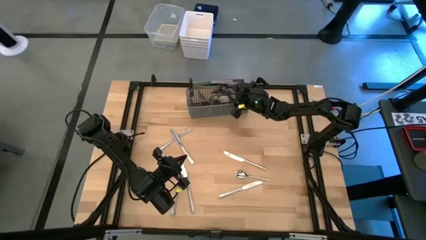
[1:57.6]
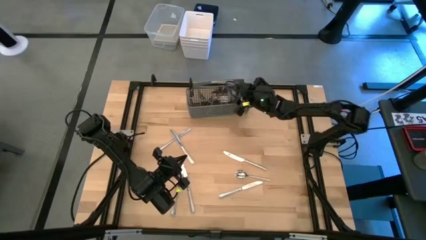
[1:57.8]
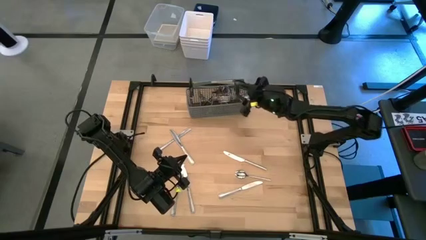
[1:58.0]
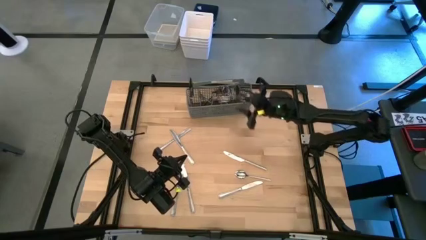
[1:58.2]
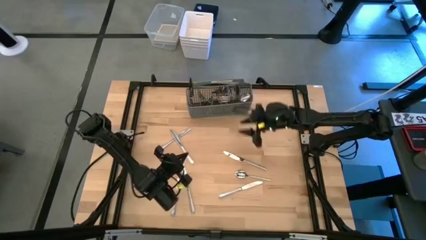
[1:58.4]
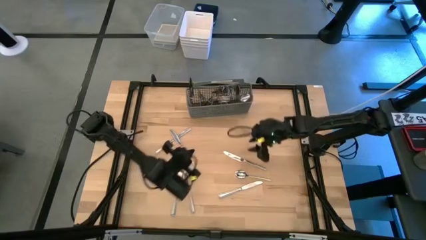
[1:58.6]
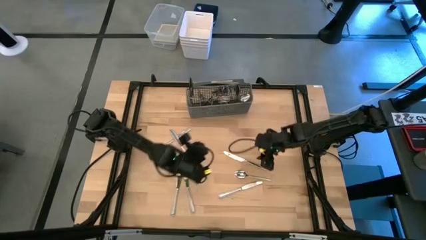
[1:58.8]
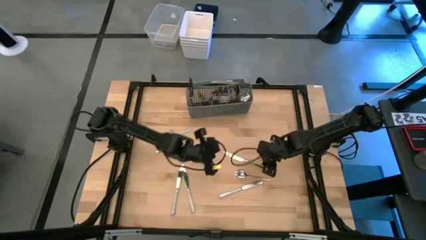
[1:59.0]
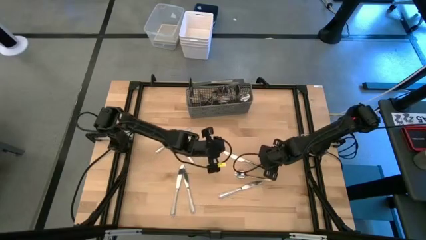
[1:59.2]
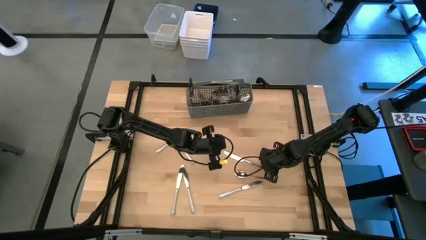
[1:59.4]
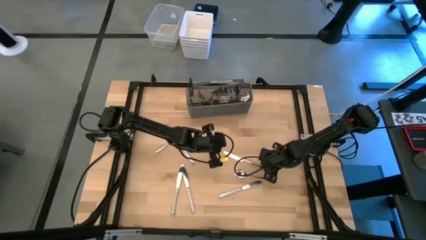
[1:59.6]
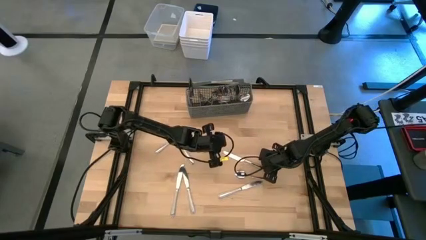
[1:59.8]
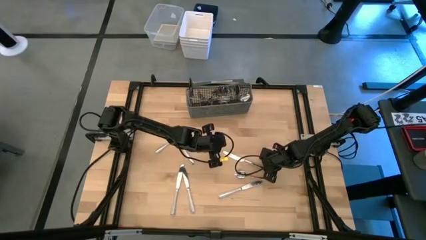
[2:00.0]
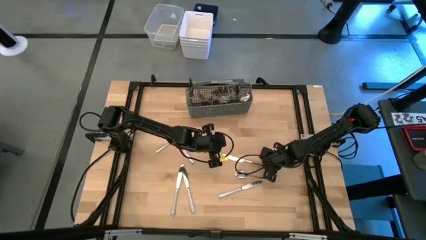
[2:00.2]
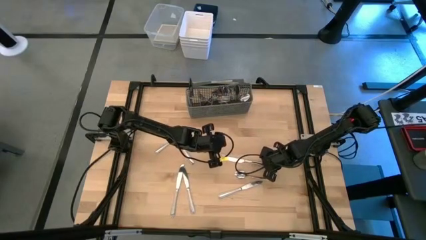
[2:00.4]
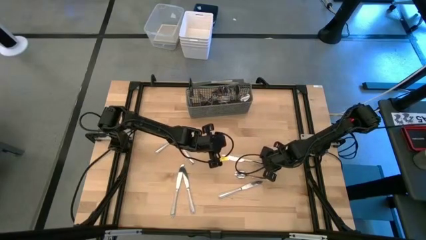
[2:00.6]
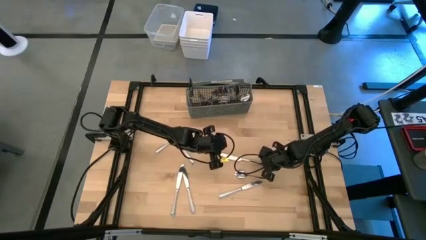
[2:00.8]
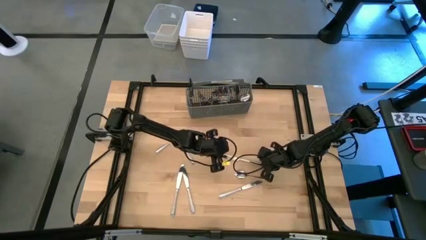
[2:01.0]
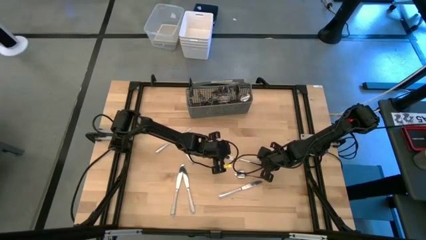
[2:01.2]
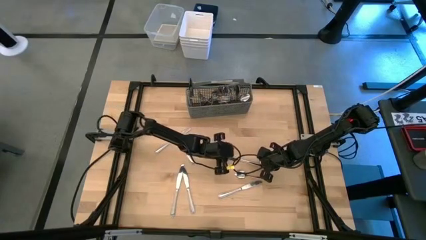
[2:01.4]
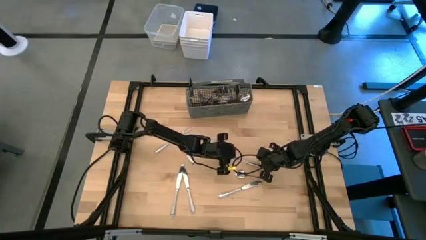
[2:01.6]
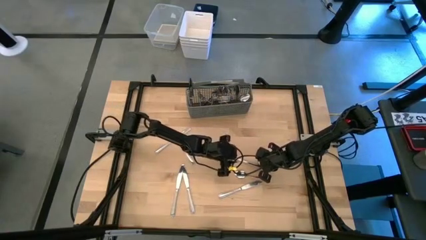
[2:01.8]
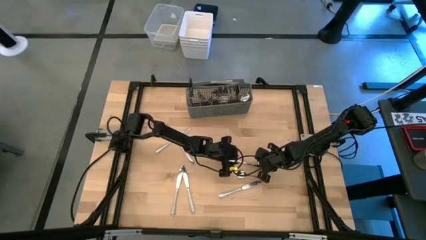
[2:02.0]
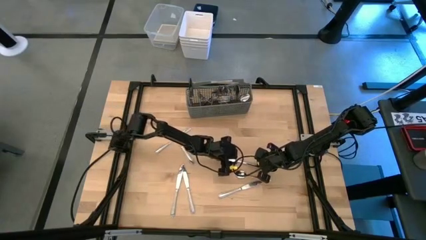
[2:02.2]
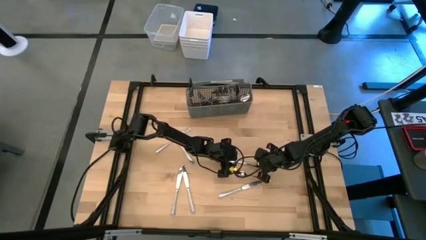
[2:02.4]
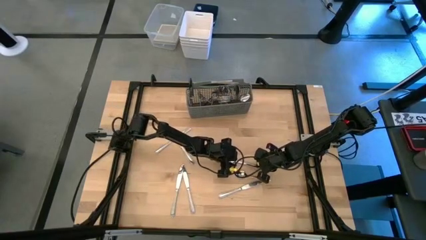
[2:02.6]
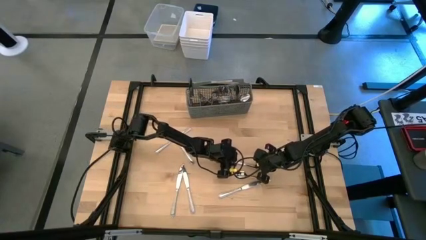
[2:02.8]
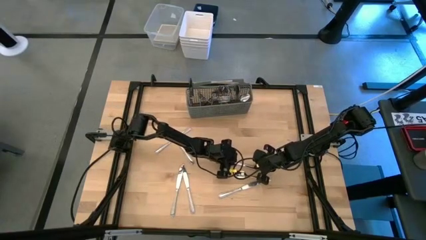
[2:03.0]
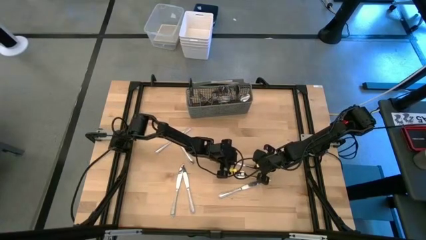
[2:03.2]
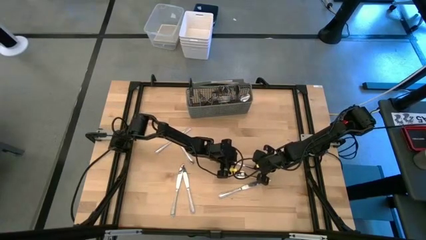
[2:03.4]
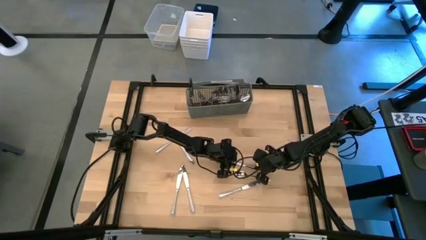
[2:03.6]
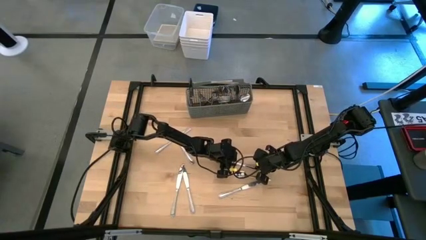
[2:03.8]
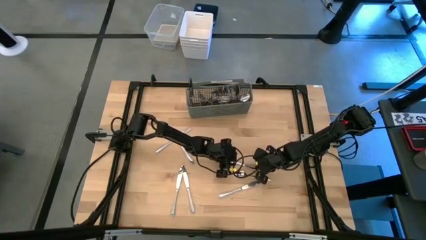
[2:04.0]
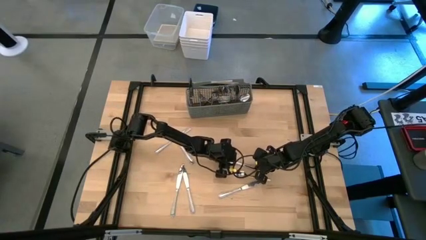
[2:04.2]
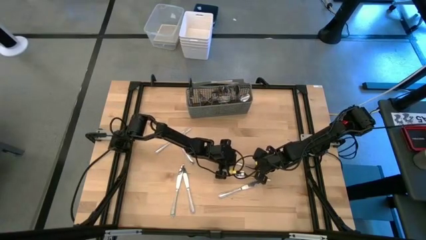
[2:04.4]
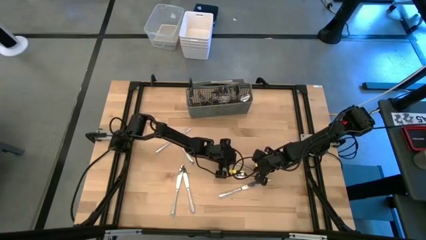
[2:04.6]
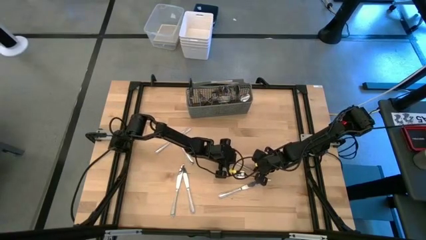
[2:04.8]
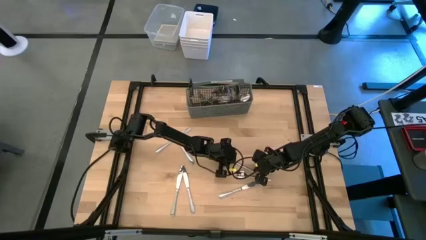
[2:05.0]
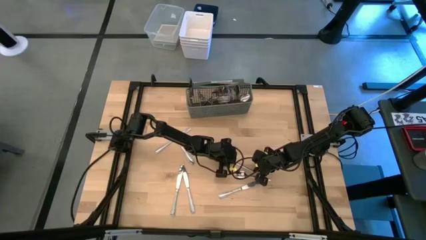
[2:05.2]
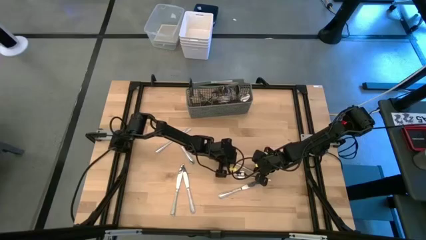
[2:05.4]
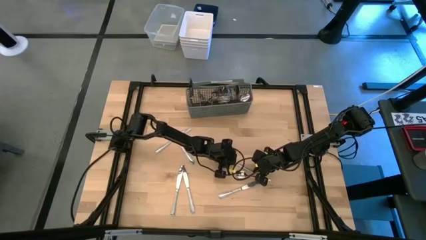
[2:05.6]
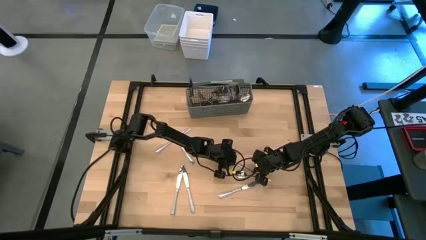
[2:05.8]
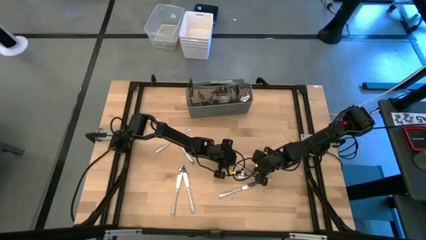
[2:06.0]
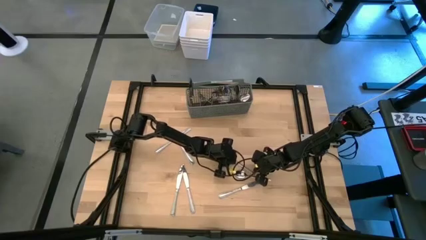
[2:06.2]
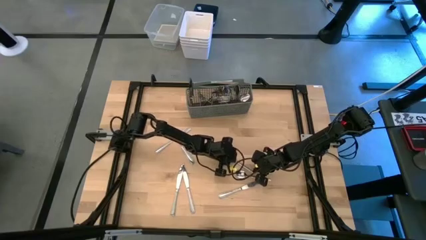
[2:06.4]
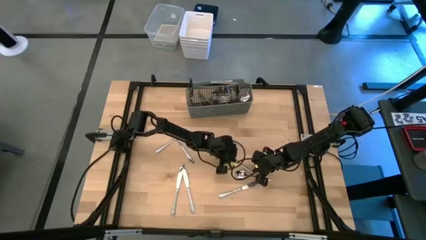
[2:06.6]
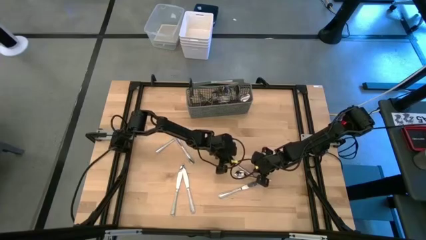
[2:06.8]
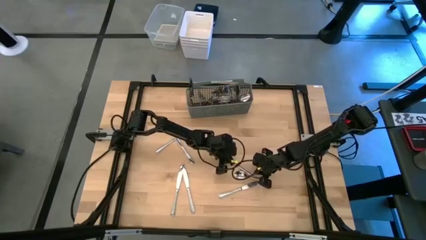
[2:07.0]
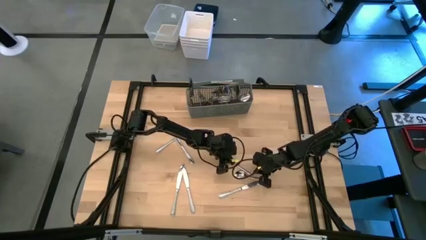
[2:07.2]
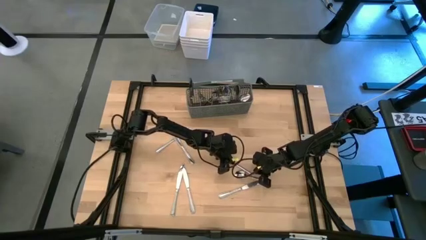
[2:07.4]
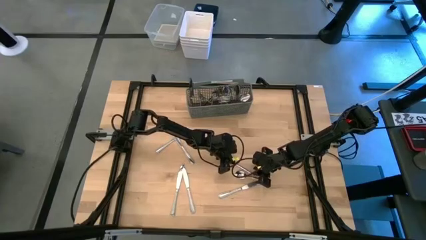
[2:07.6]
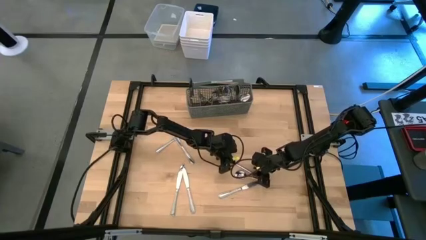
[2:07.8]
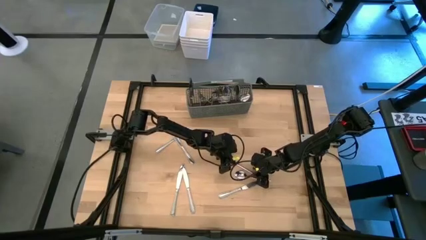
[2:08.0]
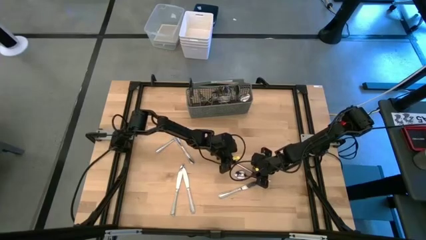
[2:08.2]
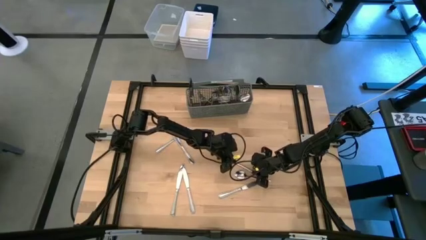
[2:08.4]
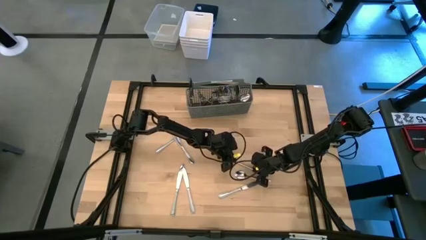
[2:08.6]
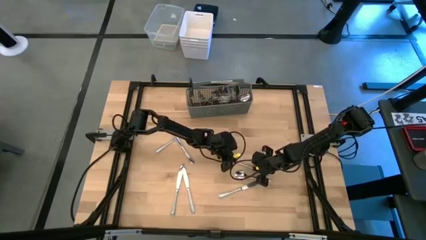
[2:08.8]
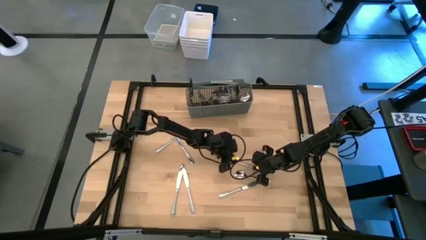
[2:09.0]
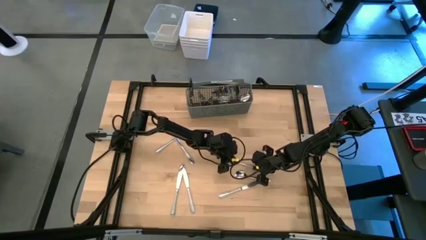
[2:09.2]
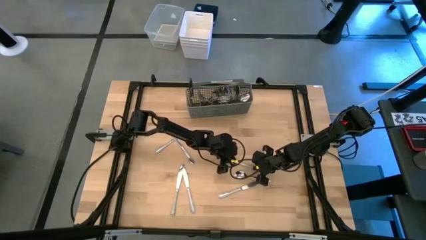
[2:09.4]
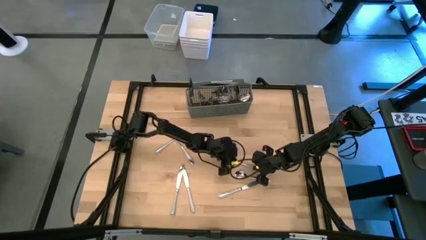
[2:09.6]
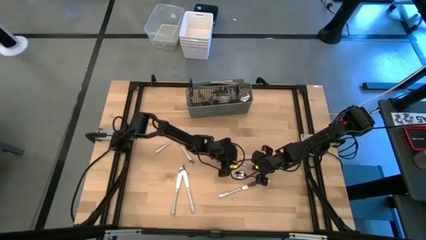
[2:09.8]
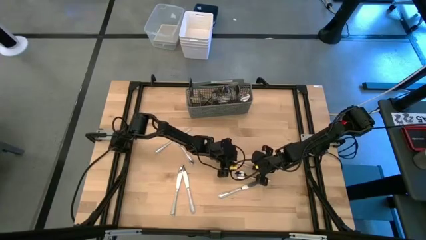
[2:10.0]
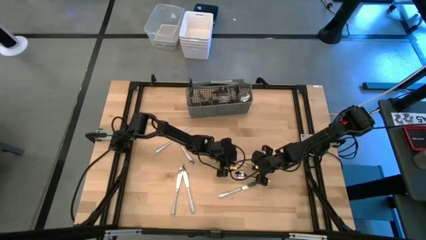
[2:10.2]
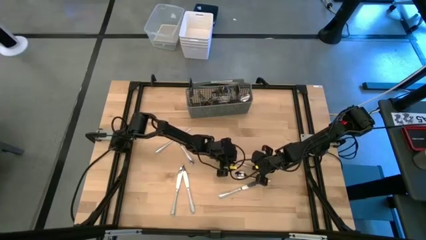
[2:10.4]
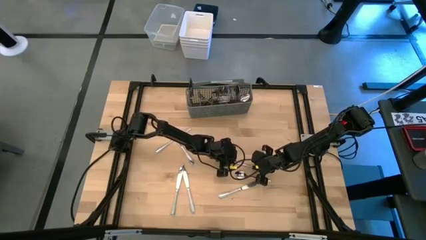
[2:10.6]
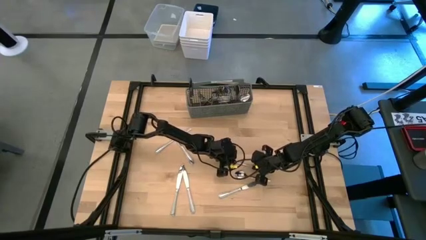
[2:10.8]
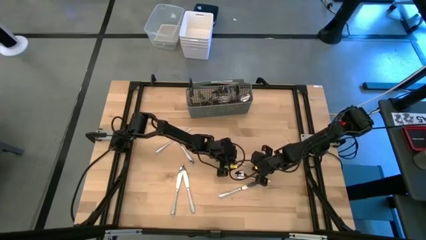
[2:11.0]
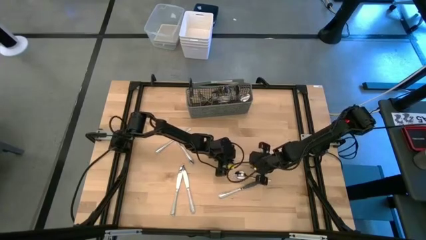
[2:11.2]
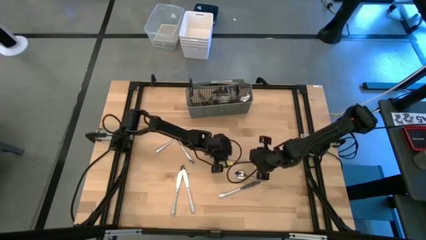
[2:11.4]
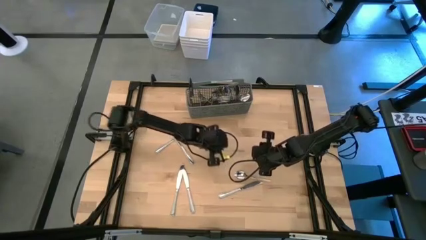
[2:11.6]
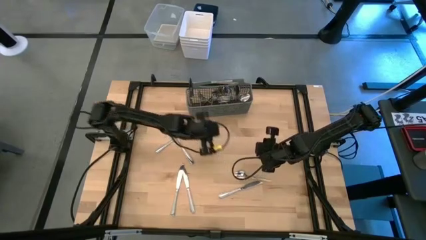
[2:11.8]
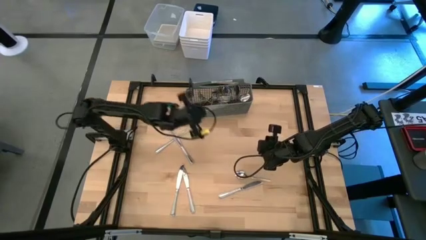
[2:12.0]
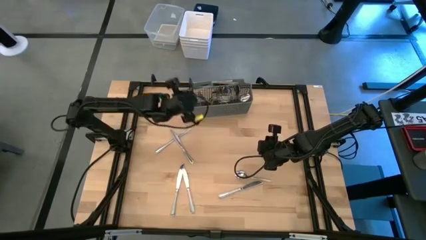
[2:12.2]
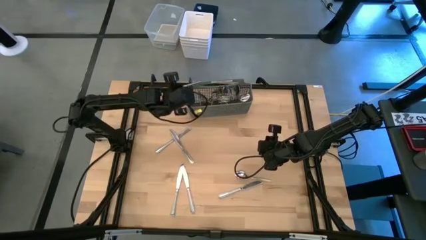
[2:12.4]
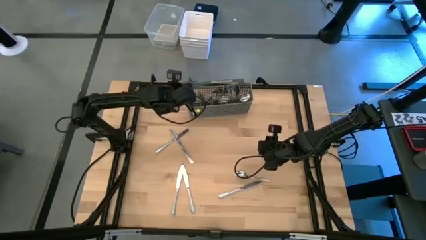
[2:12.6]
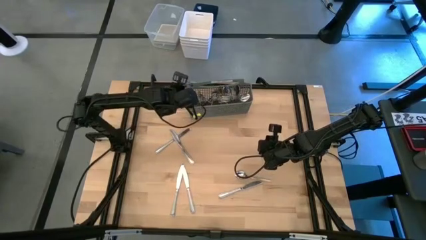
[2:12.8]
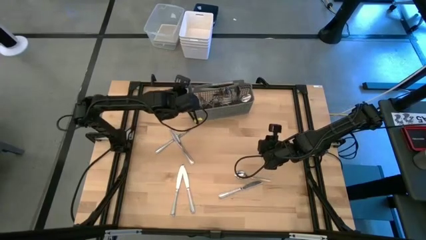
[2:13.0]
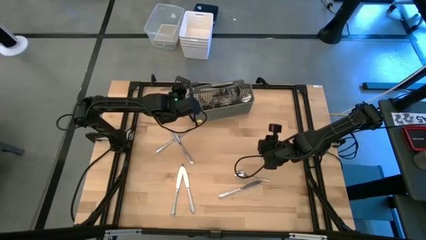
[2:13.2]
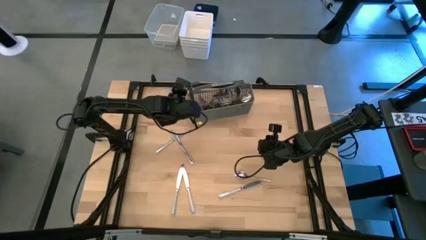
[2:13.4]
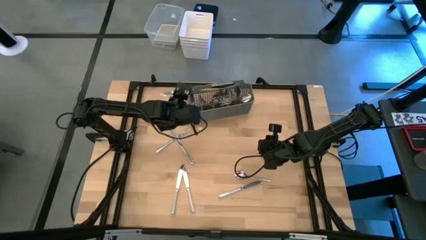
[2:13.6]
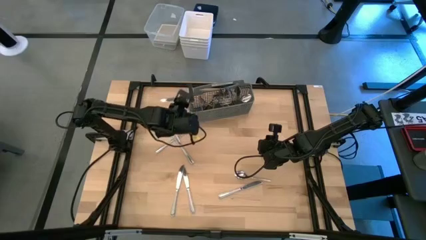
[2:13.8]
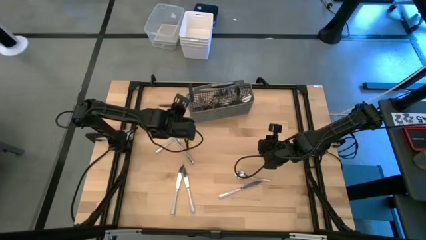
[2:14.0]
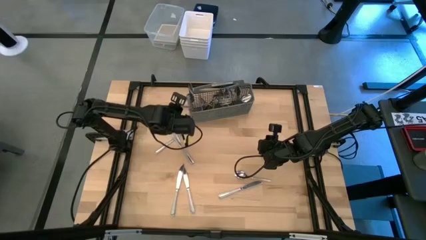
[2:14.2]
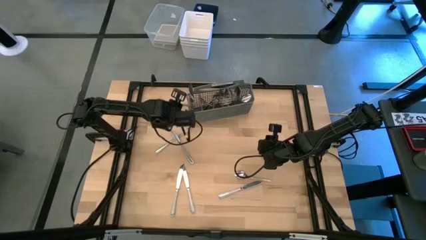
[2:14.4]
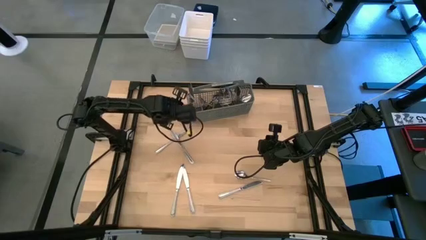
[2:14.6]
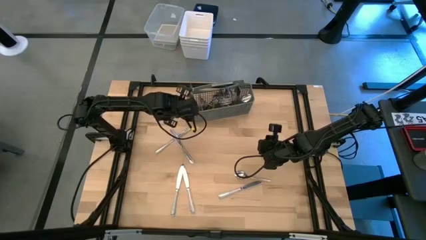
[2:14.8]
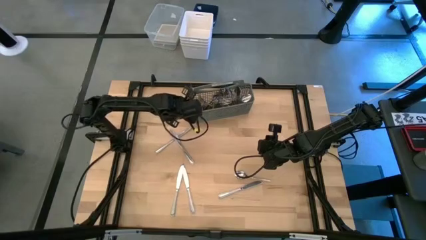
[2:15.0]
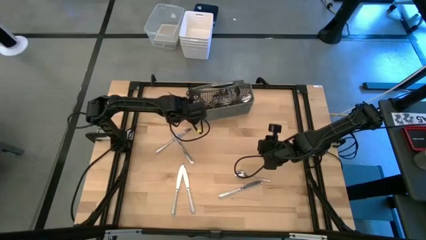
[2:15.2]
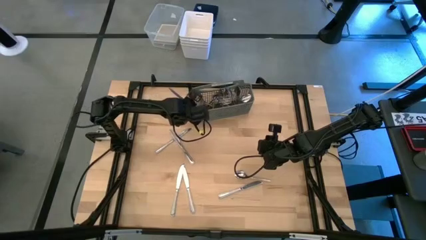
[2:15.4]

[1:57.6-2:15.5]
Task: Sort silverware
Put the silver table knife into the gray silverware organizer
